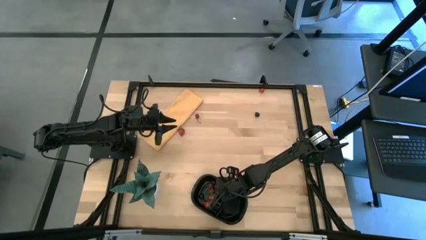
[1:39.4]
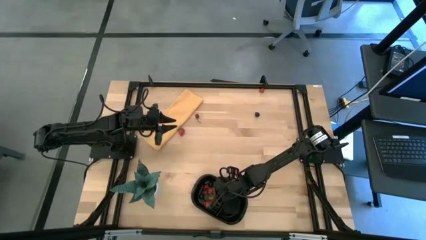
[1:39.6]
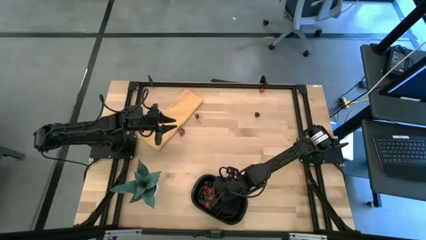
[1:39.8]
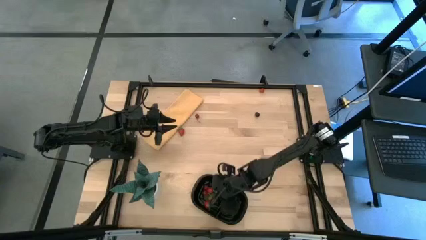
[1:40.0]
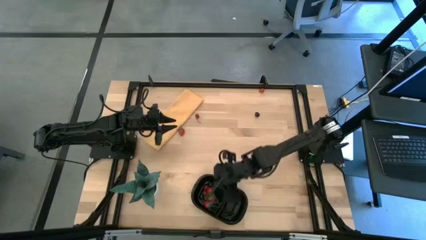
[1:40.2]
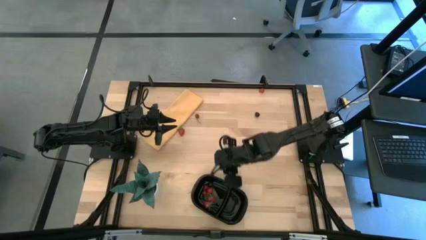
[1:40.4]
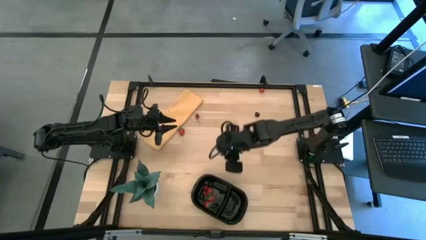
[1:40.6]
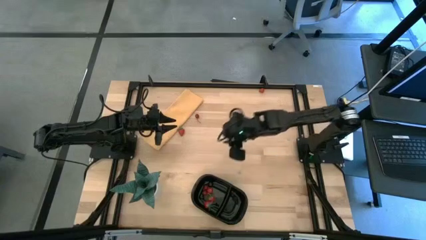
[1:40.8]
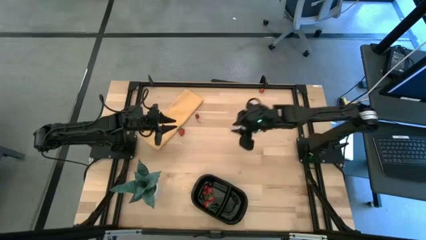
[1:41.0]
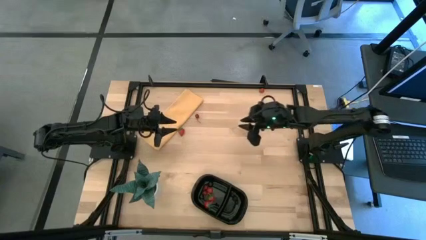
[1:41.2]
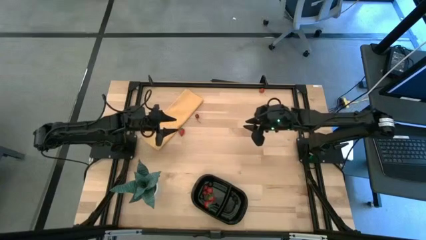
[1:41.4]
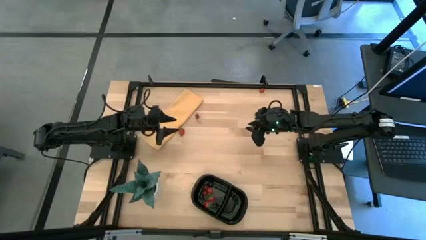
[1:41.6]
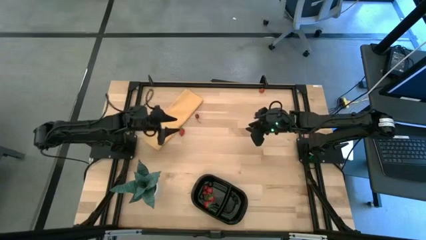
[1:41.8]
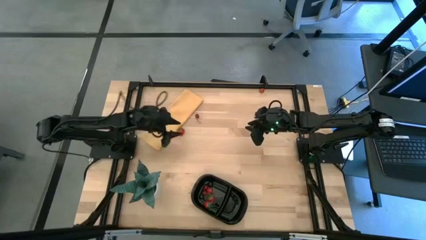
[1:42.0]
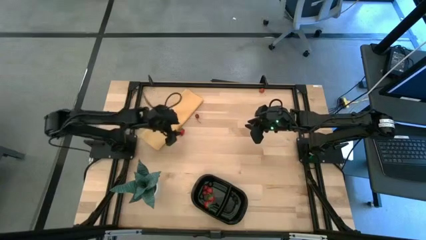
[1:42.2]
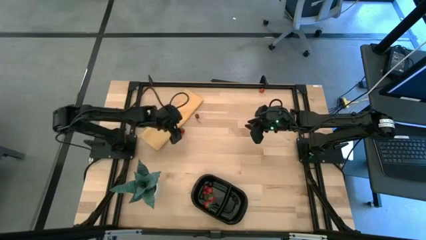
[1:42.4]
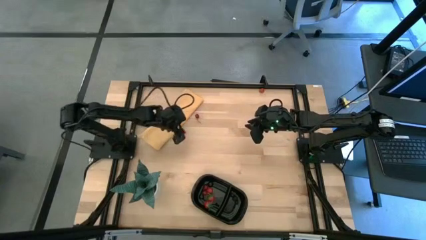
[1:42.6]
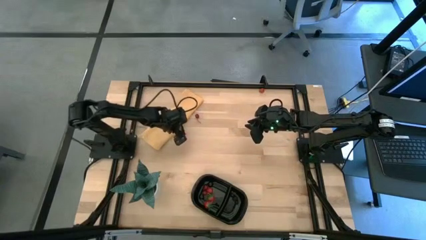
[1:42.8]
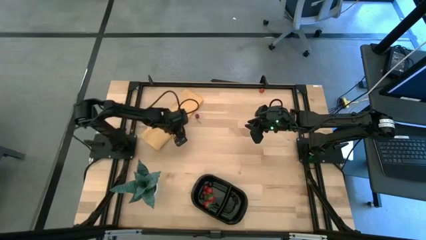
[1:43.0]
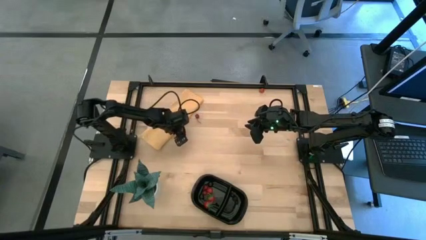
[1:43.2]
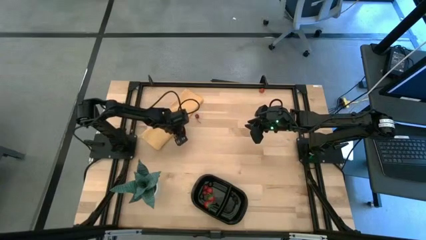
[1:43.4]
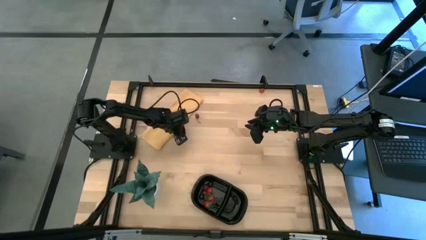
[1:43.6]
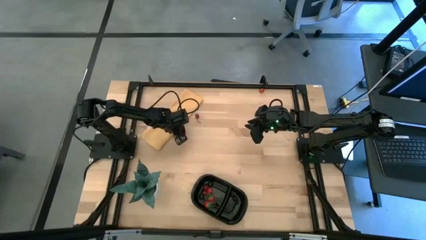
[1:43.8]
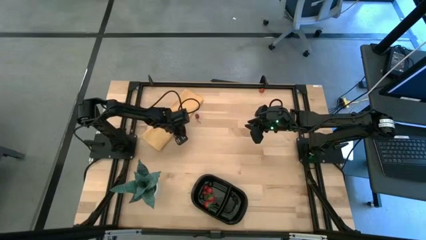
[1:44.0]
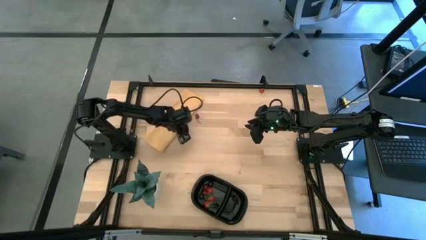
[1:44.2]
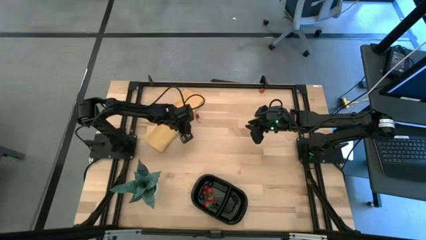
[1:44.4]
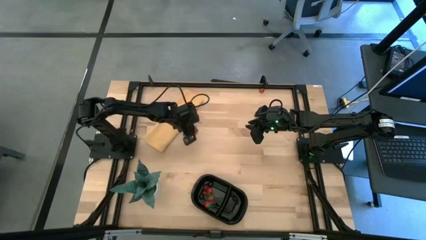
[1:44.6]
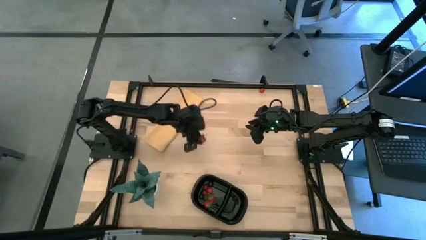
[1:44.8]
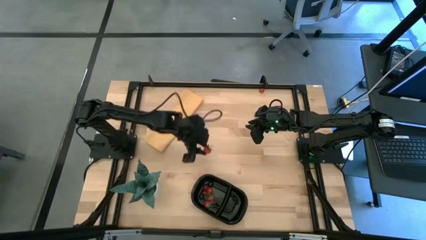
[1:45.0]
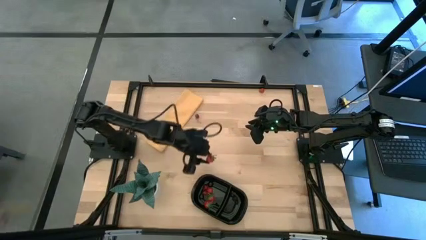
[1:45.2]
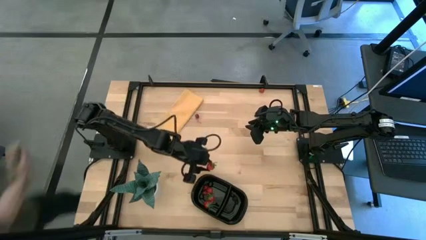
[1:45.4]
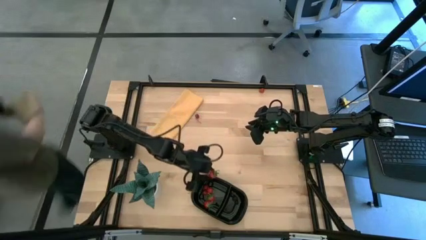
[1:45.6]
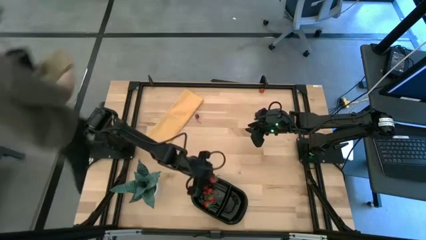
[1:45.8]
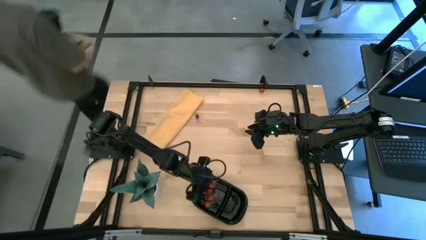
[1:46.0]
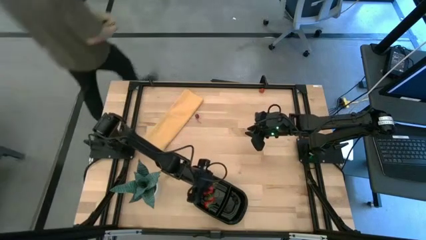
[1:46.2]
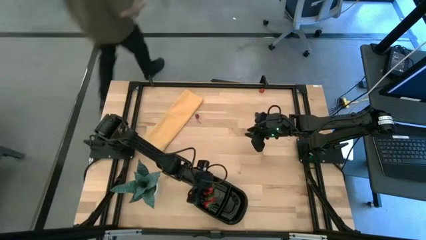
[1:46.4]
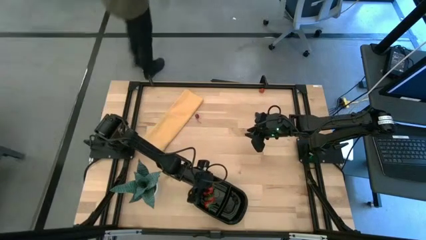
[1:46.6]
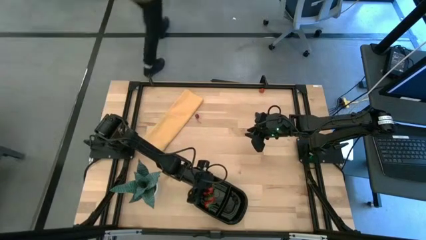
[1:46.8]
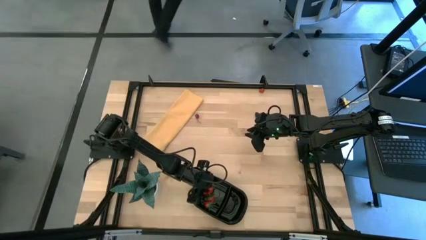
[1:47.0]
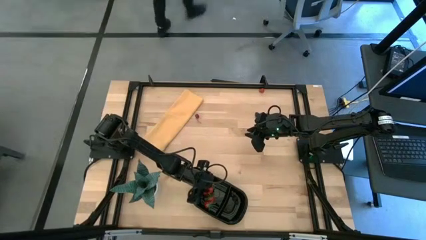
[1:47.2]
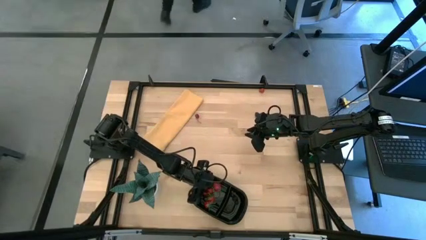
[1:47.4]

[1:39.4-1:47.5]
Task: Pick and placing Produce into tupperware
Put the red strawberry into the black container

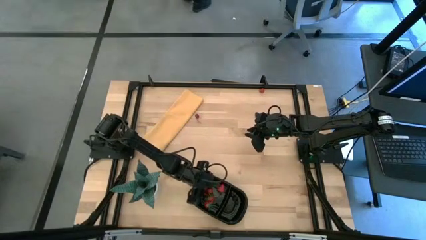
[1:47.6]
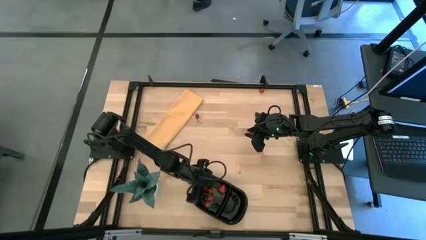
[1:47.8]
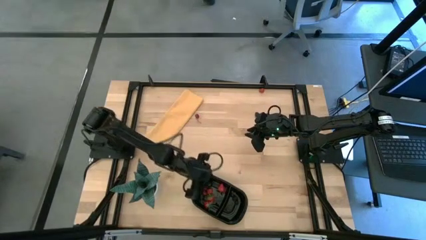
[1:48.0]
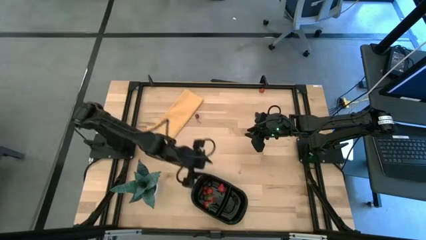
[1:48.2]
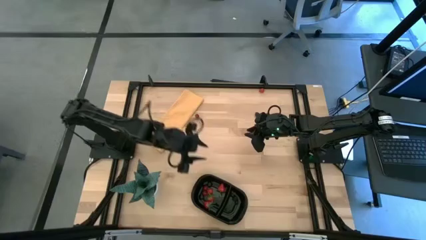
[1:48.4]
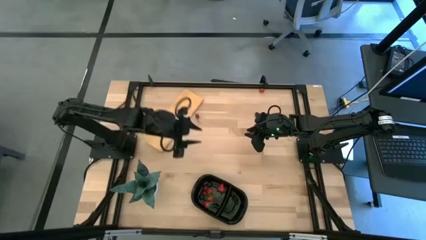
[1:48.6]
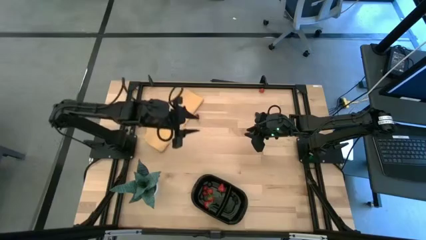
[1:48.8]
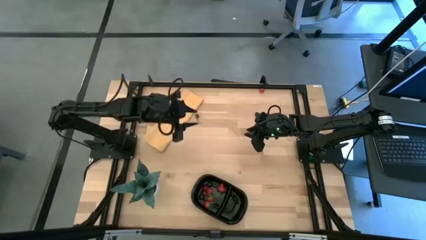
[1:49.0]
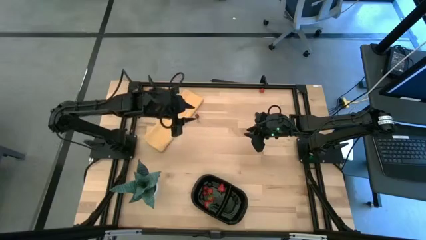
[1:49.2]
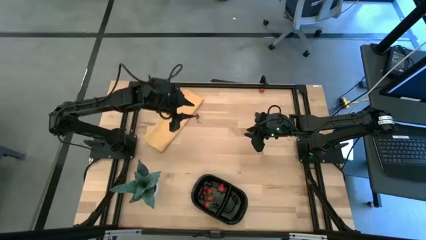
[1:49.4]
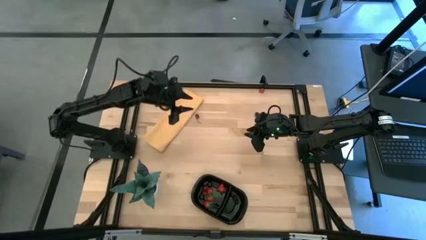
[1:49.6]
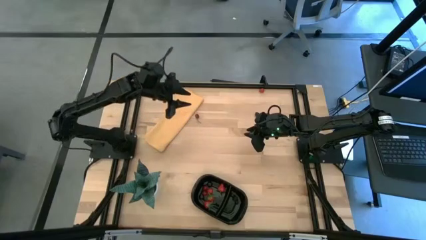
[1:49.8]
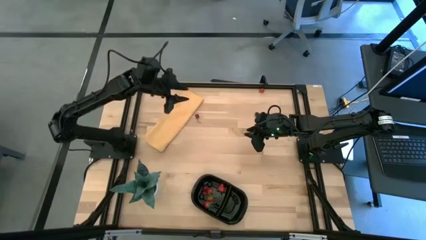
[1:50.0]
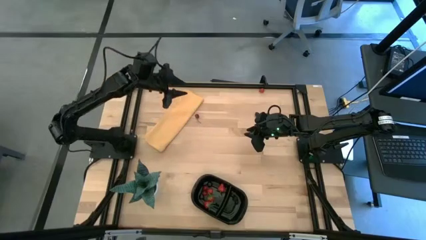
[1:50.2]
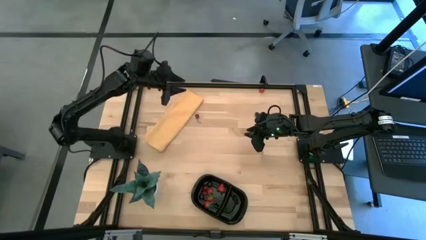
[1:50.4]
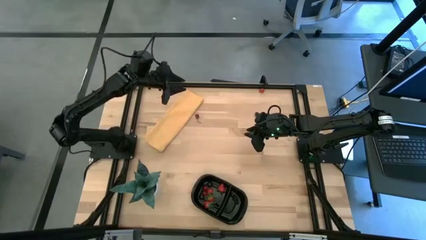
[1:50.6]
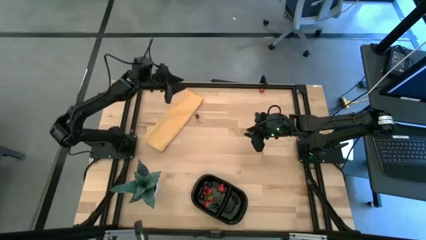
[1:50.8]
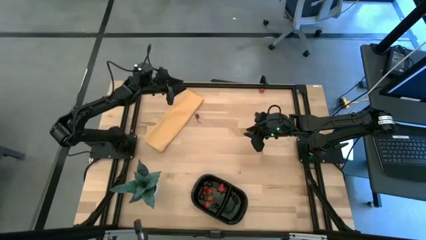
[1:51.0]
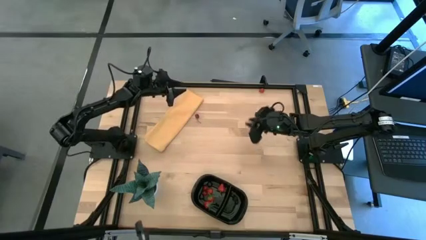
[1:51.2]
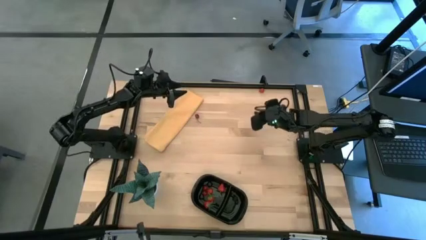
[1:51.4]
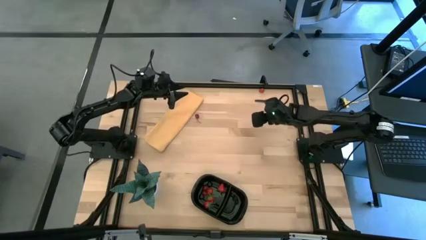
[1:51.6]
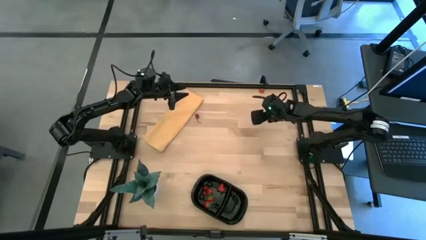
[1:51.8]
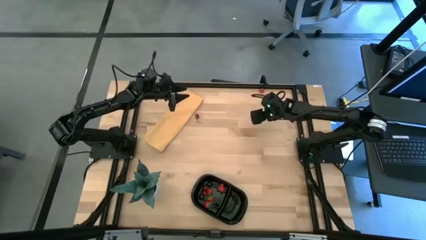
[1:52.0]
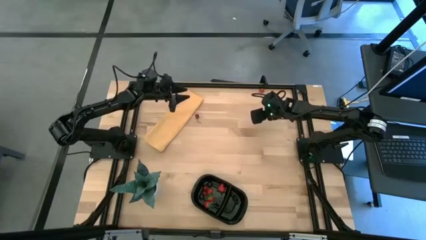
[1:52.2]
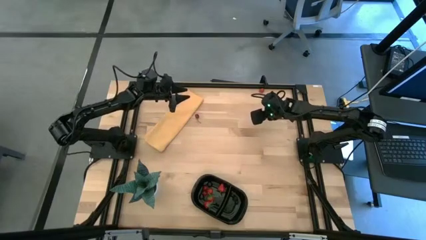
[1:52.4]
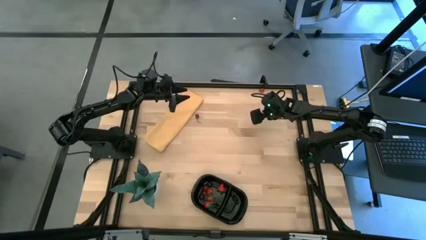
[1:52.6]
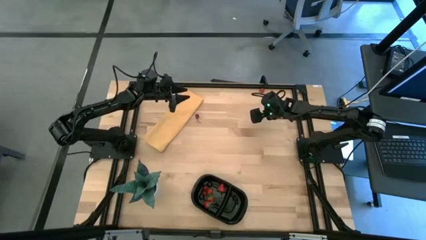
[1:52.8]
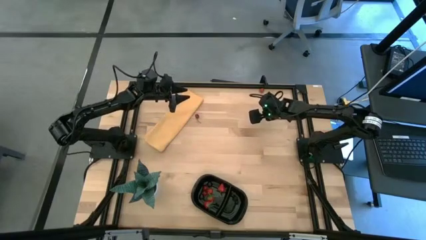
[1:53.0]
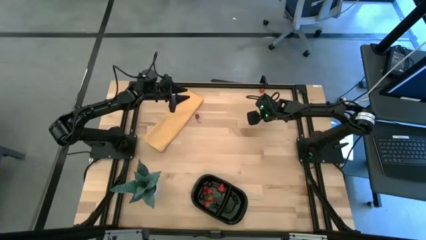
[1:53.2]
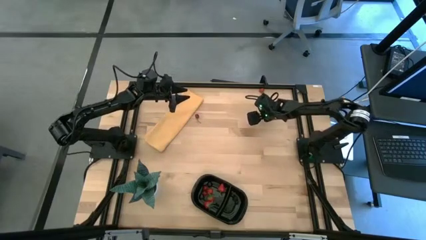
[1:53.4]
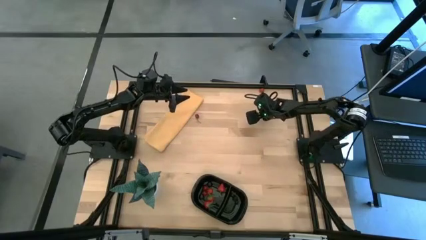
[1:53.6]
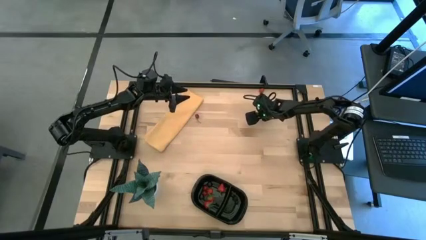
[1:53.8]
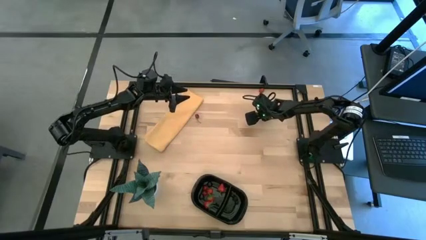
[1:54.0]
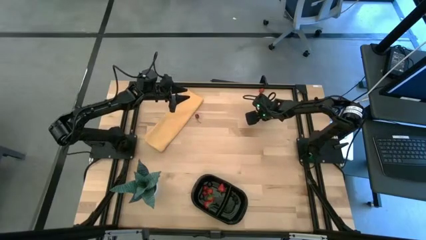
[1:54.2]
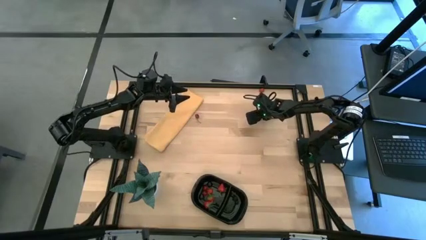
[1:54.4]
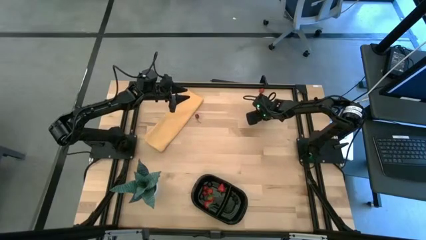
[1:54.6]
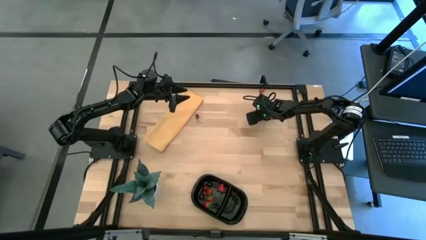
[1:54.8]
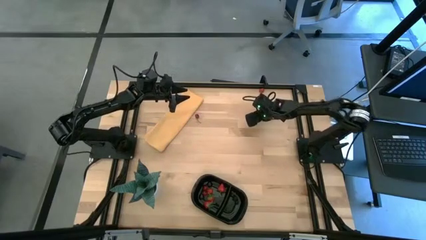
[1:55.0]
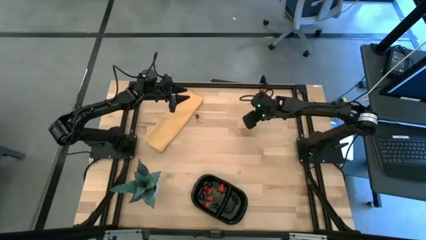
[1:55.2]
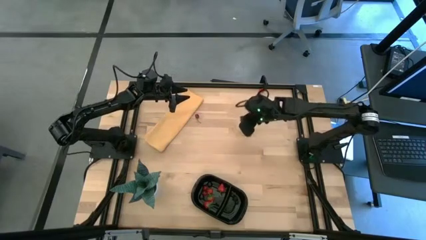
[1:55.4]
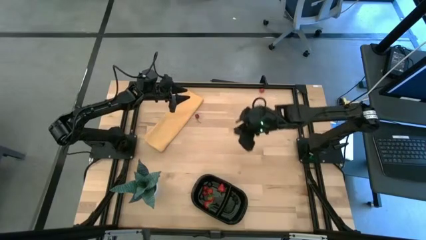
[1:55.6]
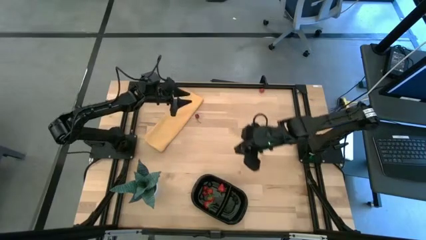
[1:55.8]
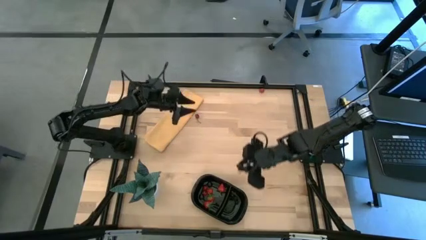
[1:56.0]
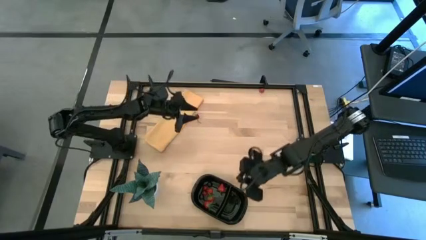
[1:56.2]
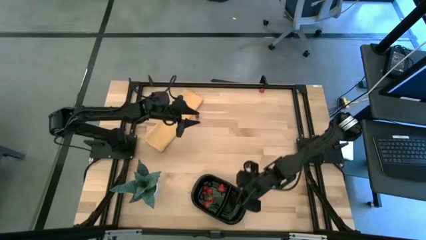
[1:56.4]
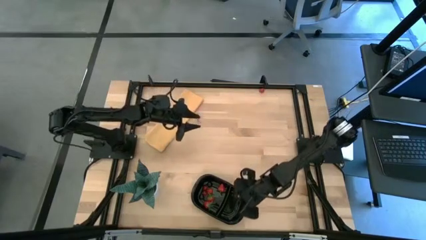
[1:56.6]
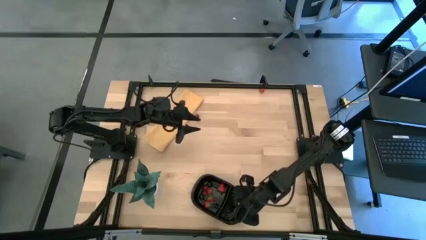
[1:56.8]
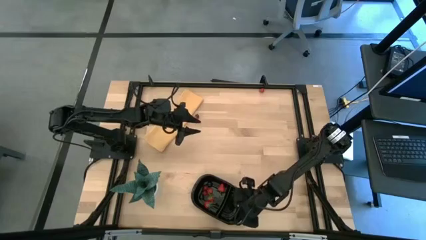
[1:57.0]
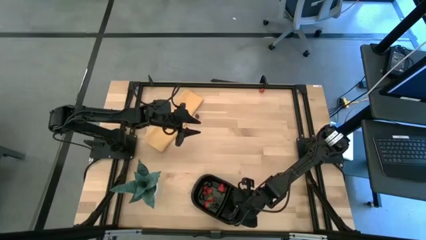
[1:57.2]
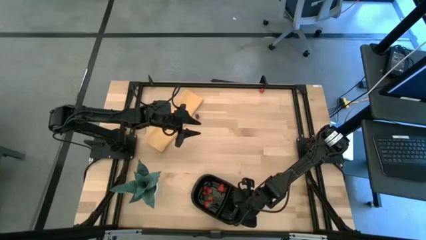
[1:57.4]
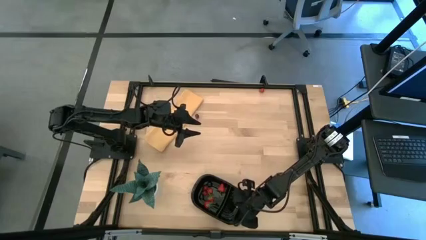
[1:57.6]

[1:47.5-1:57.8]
Put the blackberry into the black container
